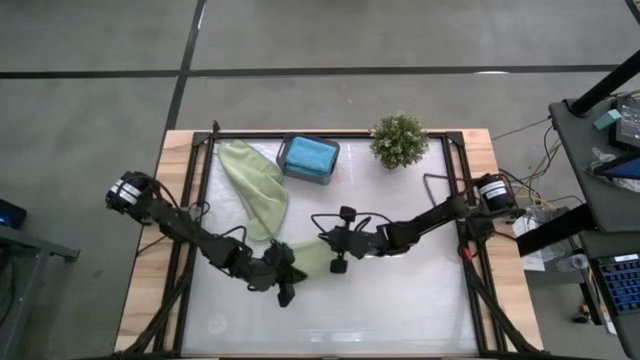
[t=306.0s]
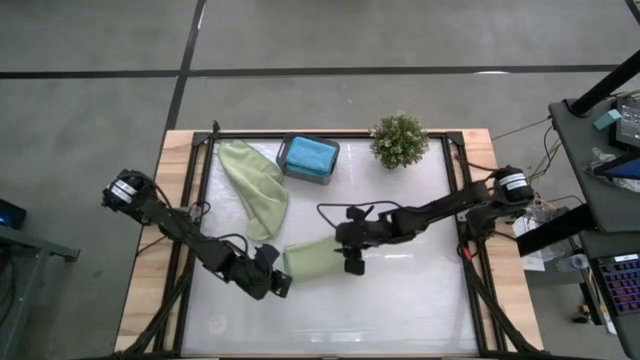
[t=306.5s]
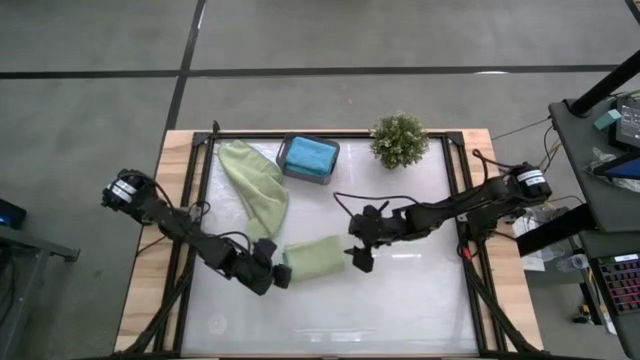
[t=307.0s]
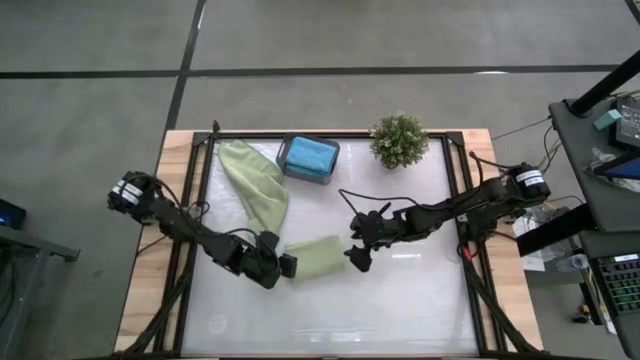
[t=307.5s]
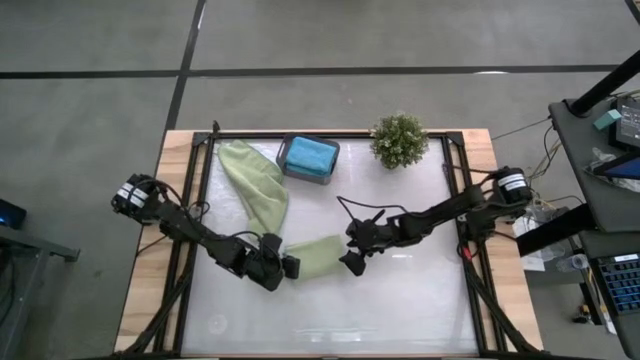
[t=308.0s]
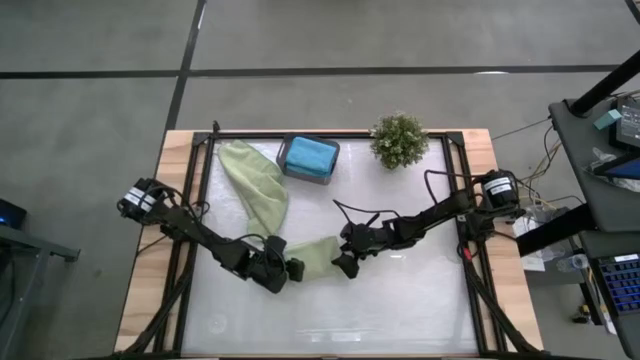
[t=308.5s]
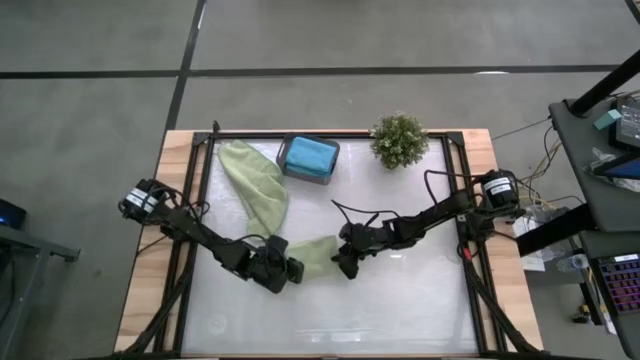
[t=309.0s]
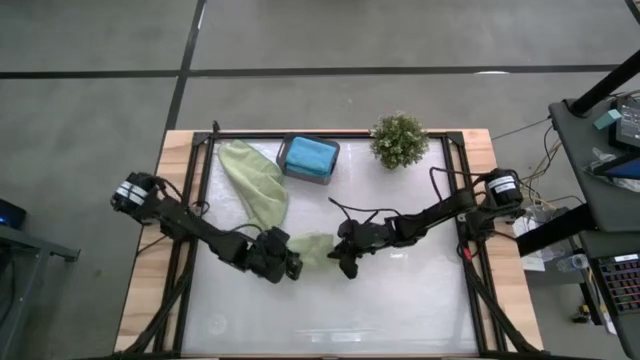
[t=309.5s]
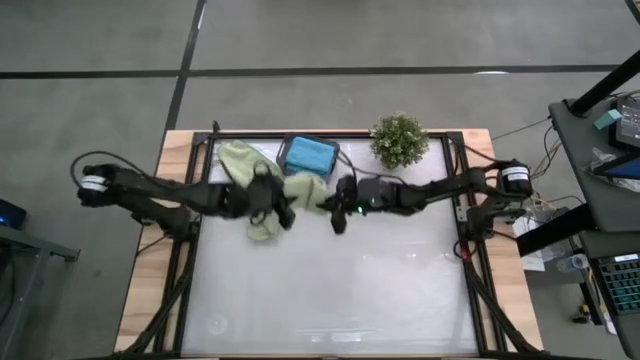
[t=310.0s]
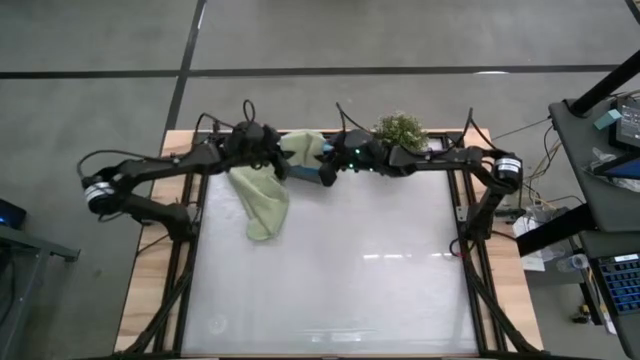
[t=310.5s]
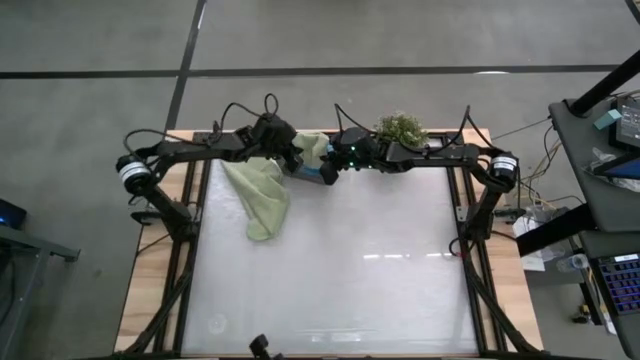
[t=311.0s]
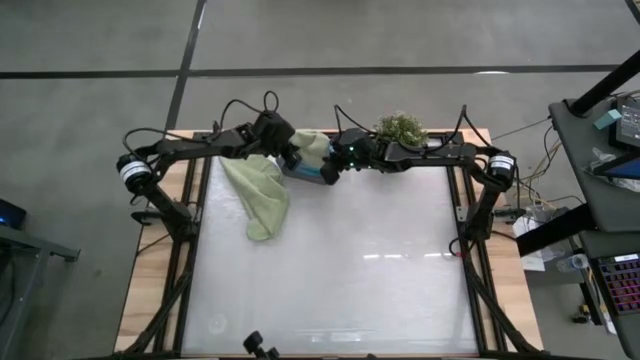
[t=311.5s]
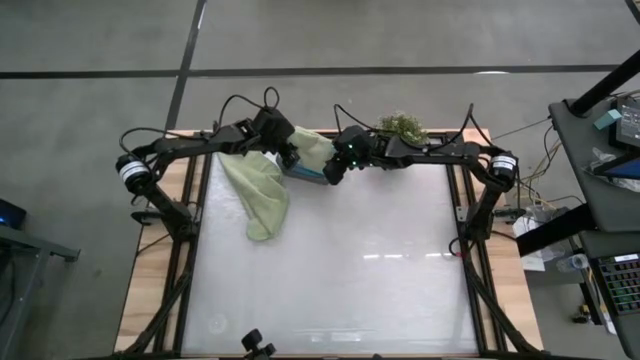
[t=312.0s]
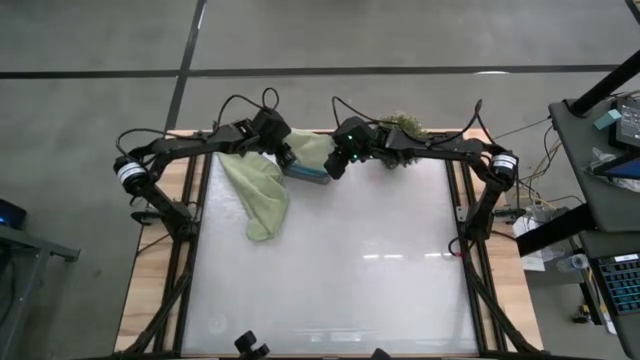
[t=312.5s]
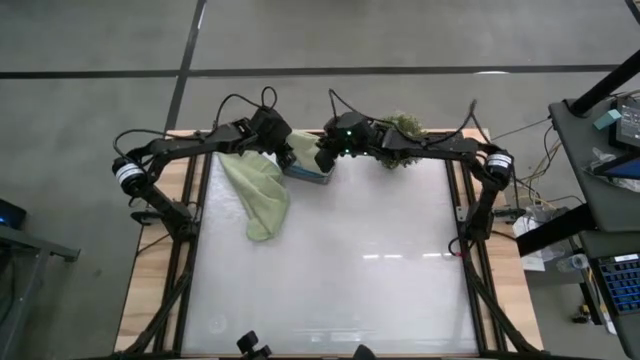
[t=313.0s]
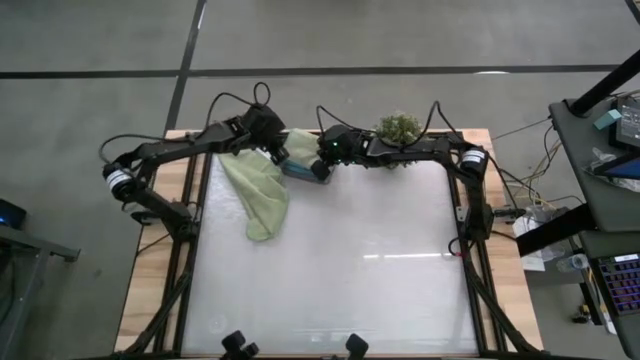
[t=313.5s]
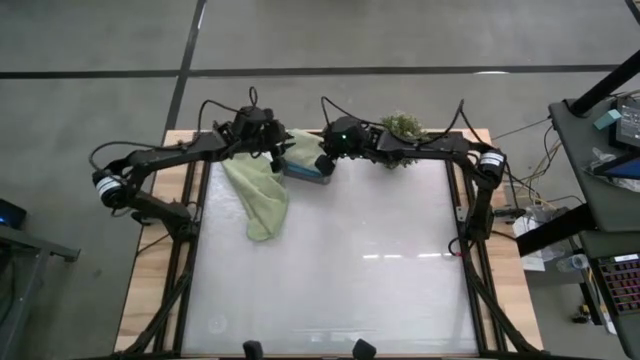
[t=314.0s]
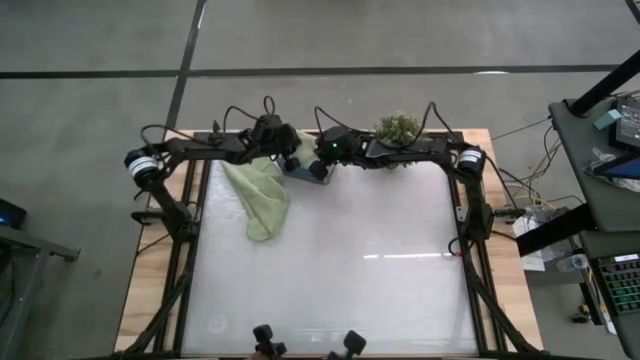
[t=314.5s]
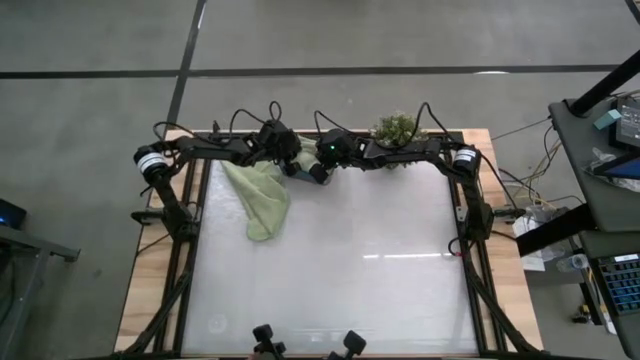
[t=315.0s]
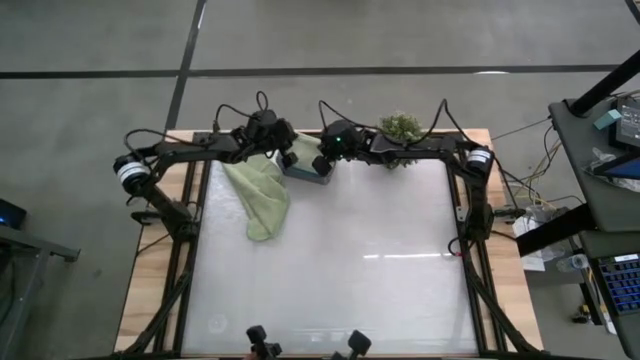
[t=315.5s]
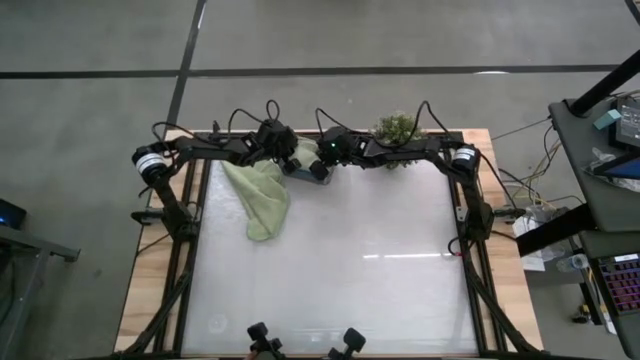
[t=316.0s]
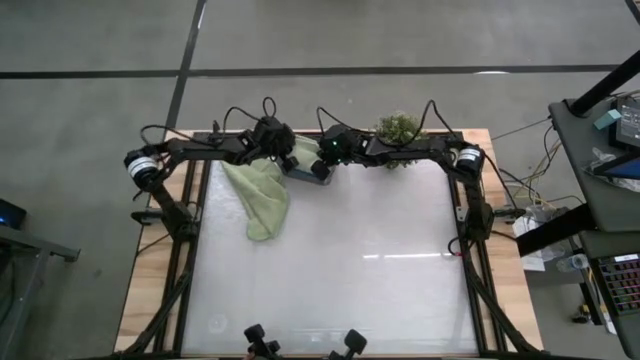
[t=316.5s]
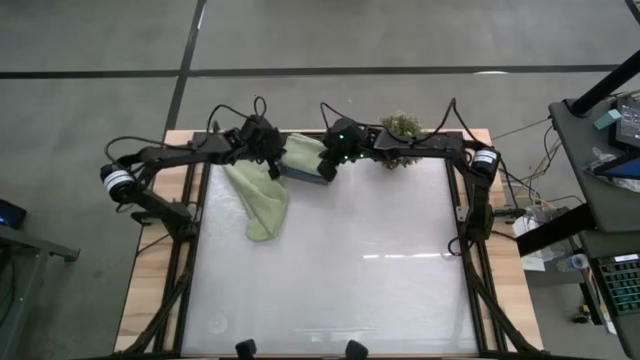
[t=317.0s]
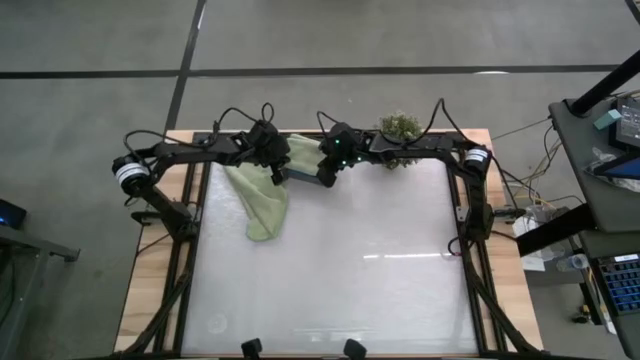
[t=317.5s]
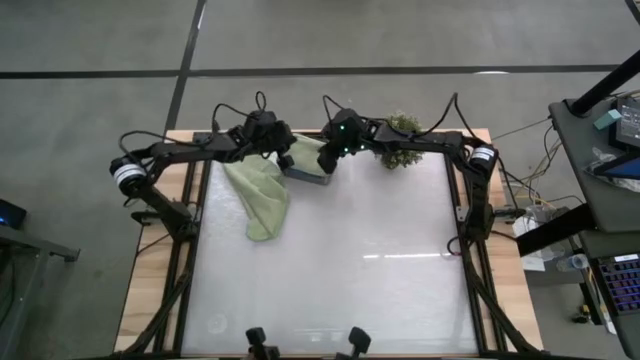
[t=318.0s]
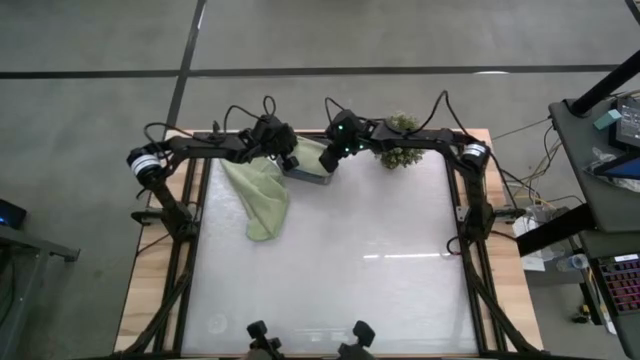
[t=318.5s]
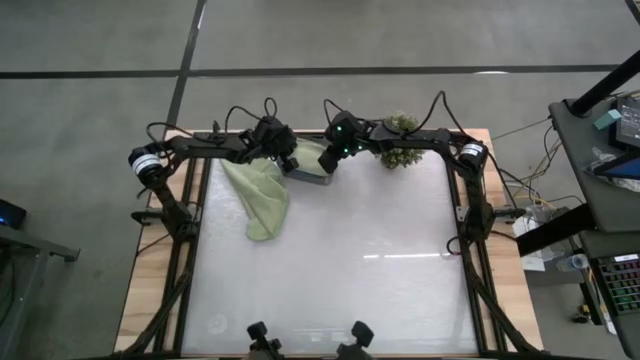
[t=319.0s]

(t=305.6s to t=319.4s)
Task: Fold microfiber towels
Put the folded green microfiber towel into the black bin

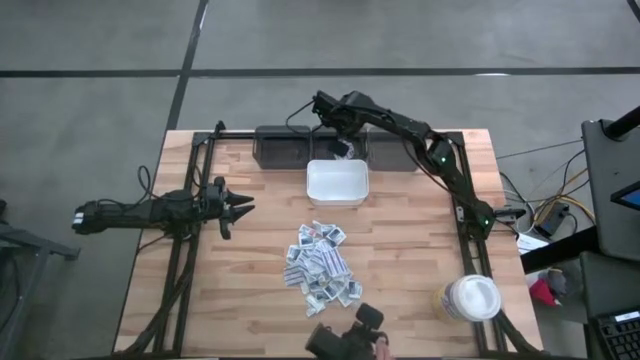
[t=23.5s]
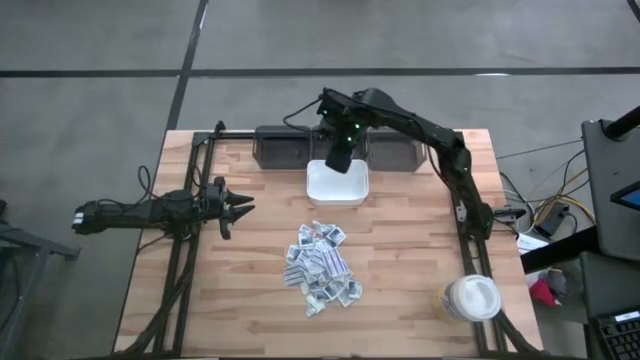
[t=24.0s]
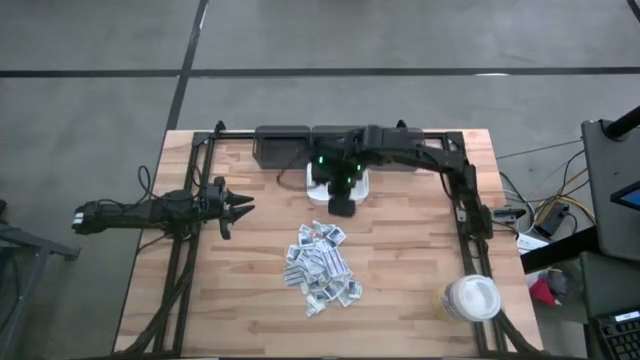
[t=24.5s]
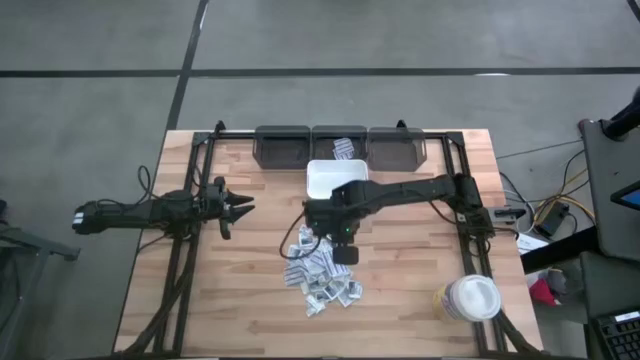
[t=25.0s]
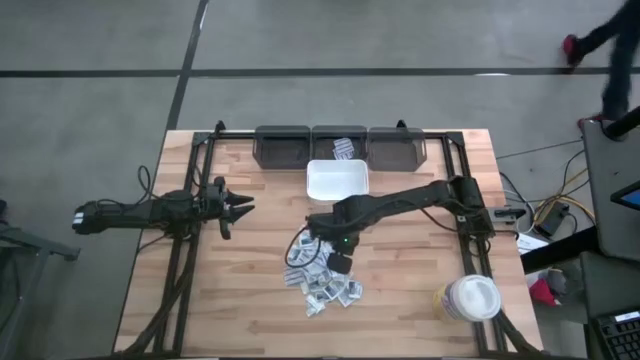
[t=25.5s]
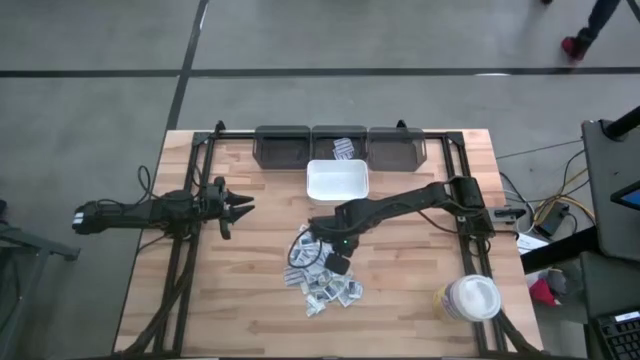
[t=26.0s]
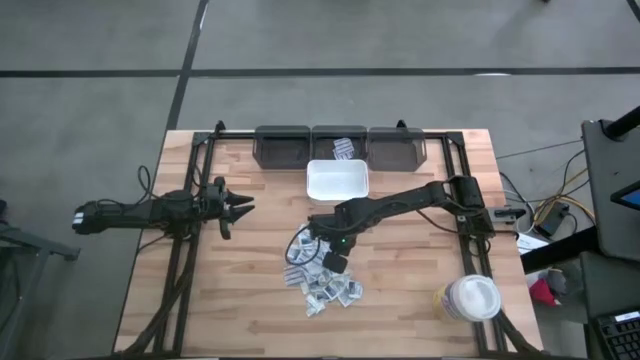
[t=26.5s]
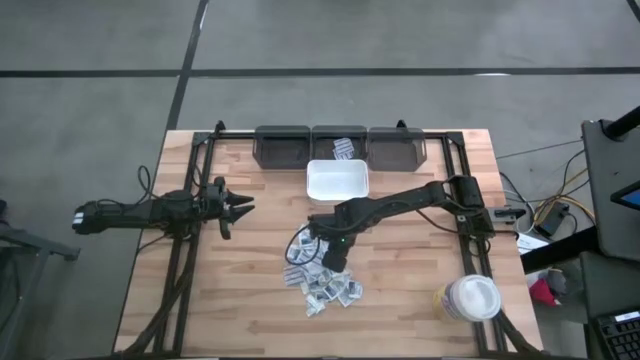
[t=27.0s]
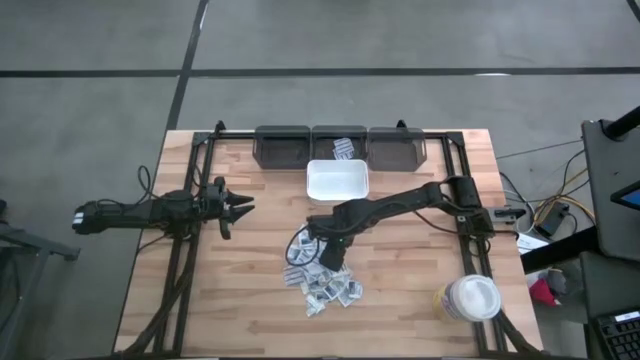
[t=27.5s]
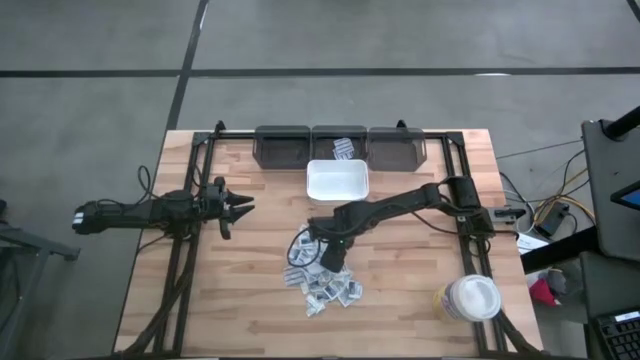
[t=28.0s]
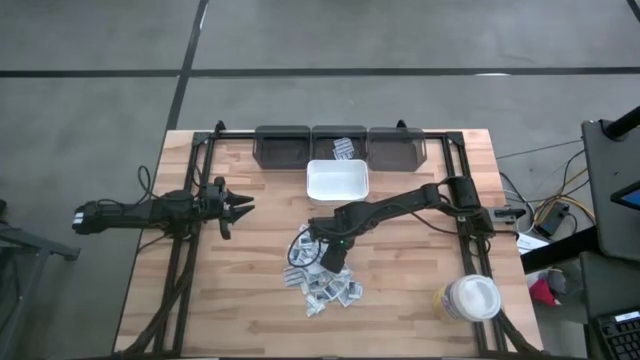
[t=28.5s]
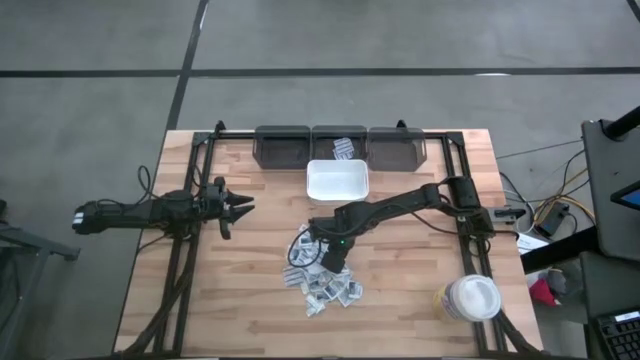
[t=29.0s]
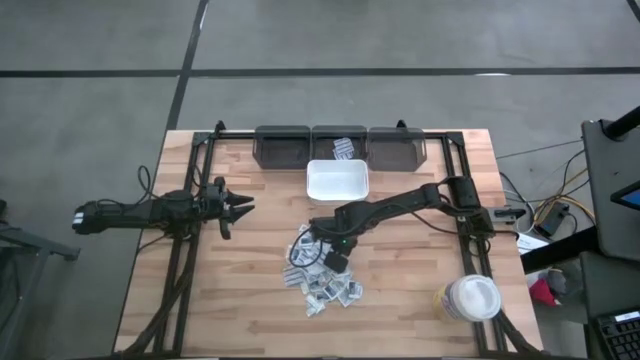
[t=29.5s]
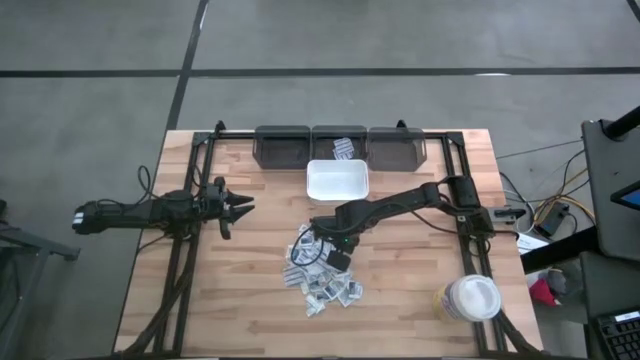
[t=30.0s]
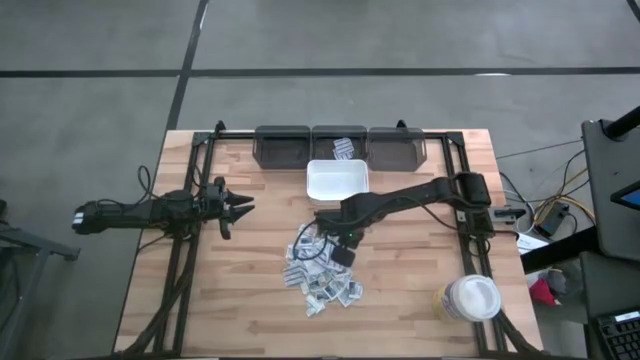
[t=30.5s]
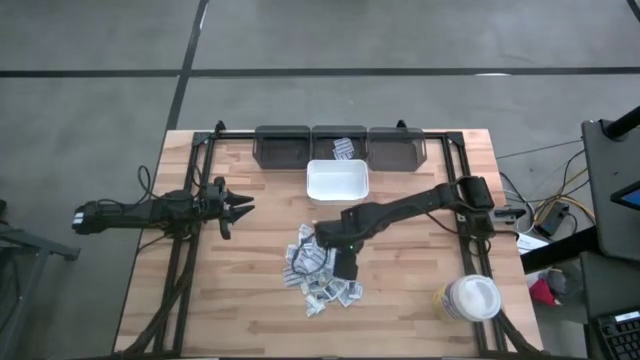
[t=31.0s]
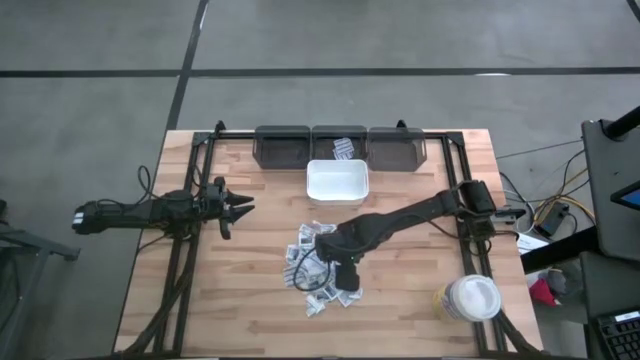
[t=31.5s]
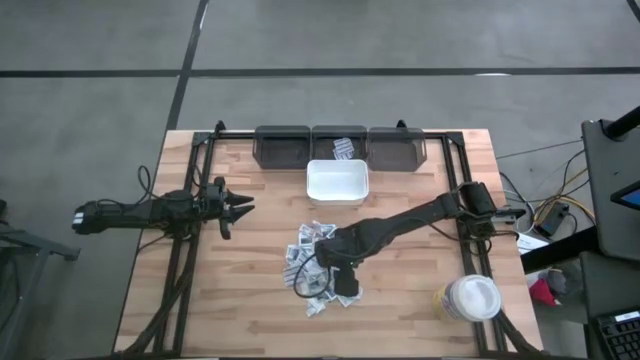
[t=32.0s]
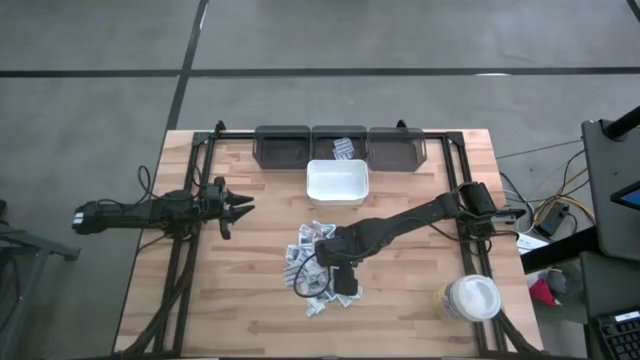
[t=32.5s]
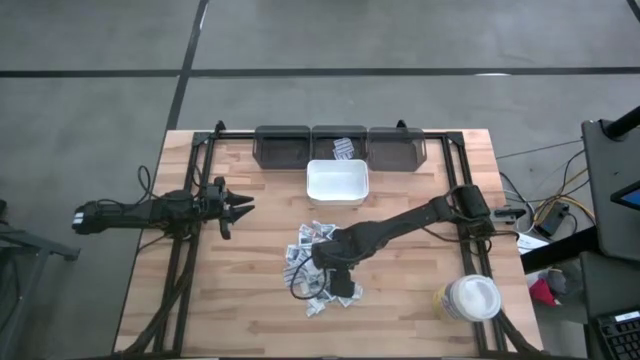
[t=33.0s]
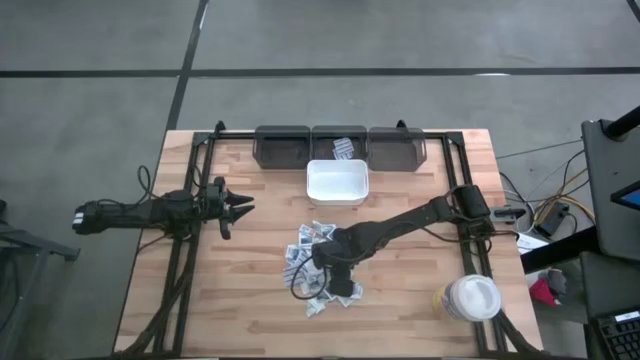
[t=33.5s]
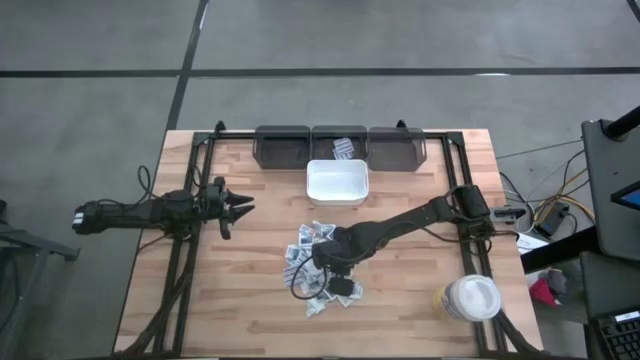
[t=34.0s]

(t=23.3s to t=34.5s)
Task: Pick & Place First Aid Supplies
Put the blue bandage into the middle black bin
